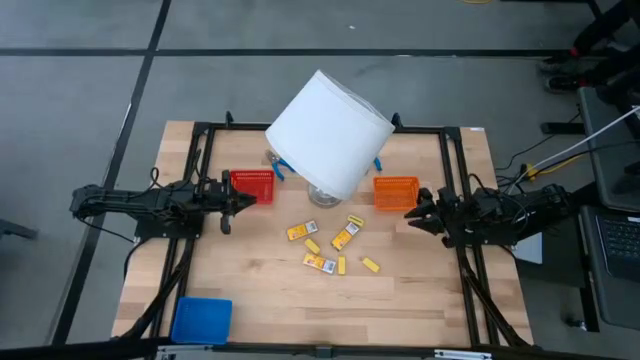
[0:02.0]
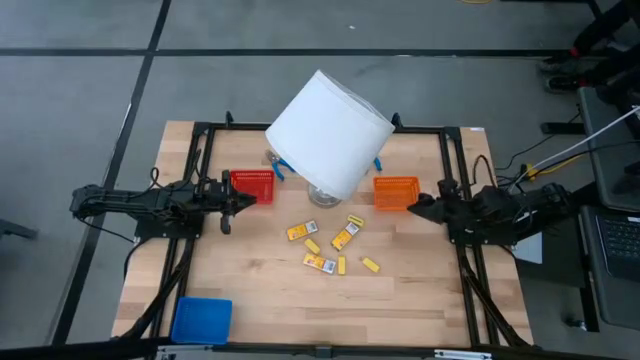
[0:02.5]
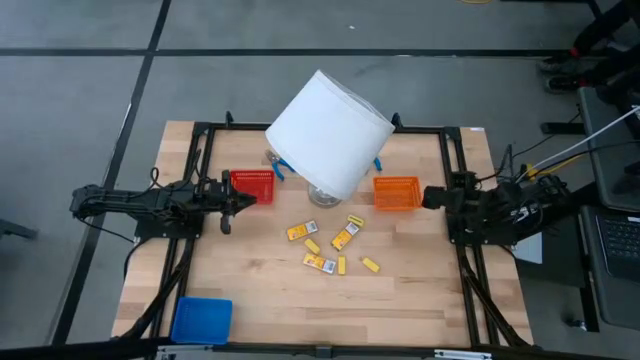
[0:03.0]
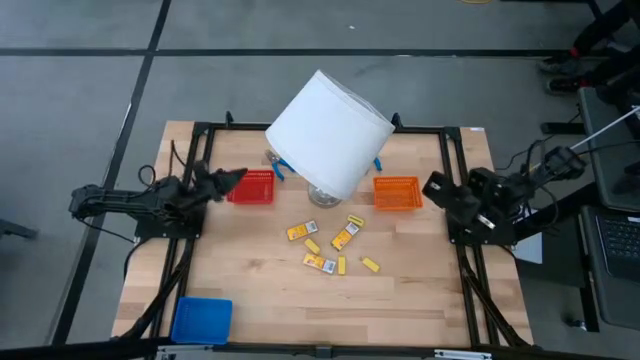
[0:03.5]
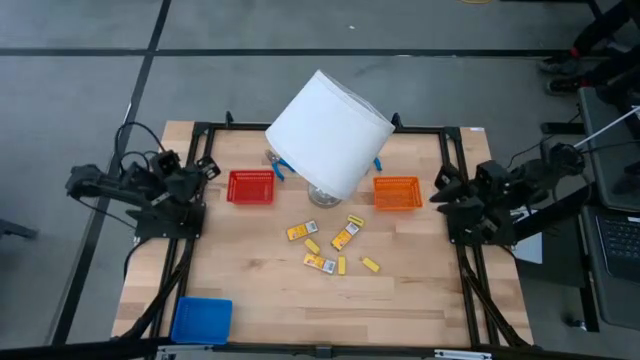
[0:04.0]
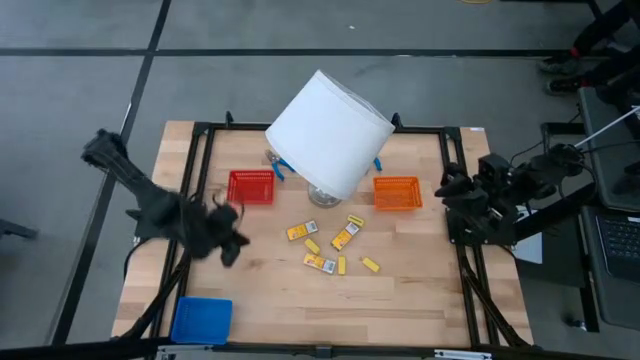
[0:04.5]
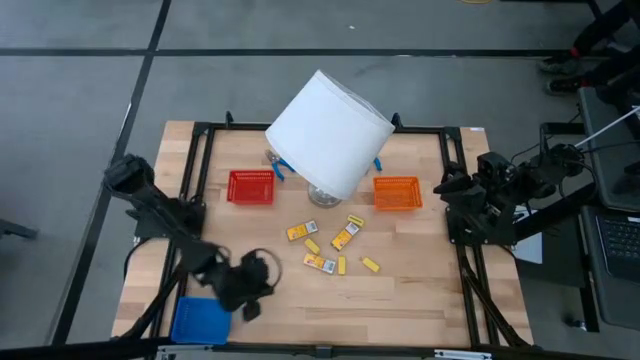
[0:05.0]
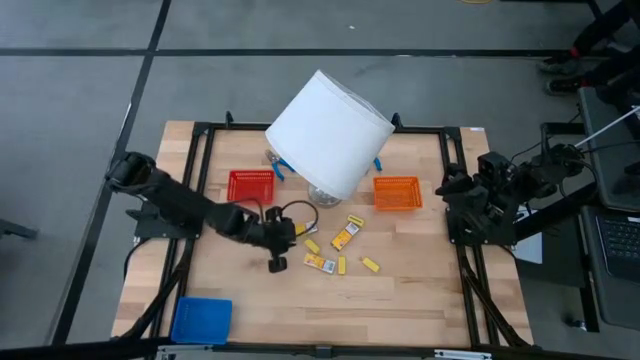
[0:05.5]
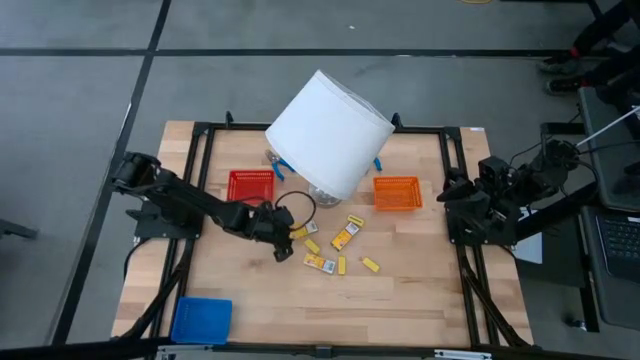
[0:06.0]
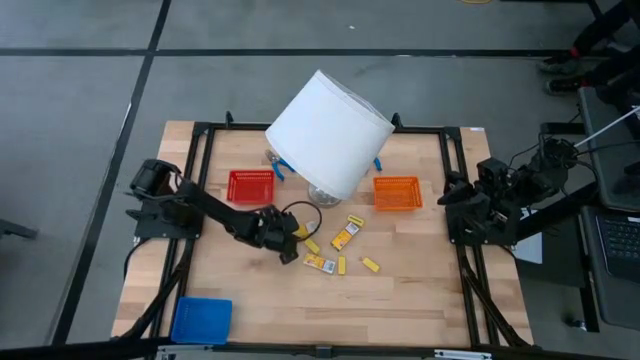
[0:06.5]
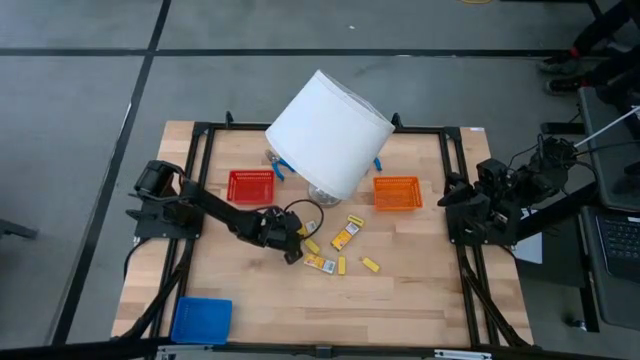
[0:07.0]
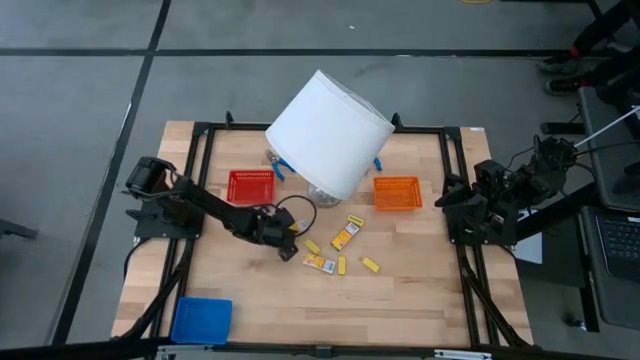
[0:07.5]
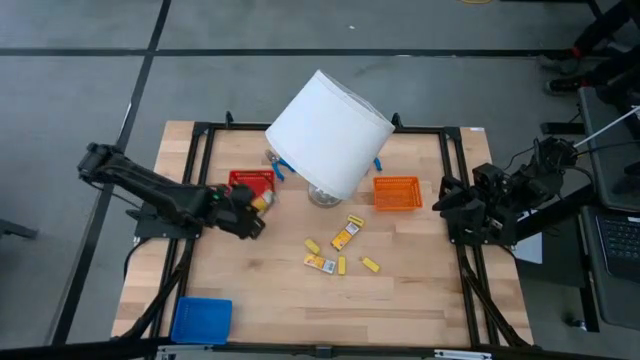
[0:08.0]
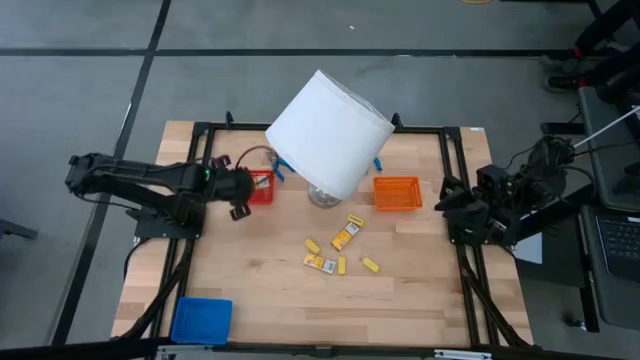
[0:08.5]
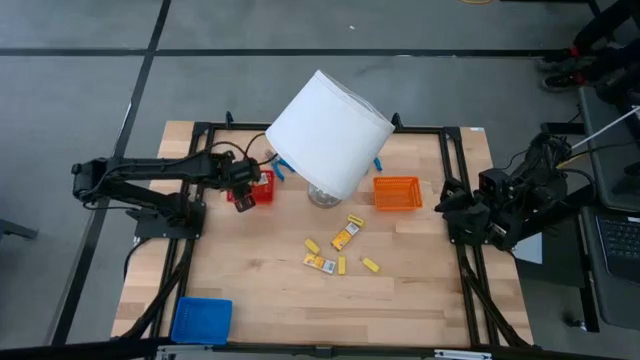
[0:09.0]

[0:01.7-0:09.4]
Task: Pick & Place School Supplies
Put the yellow crayon box into the red bin

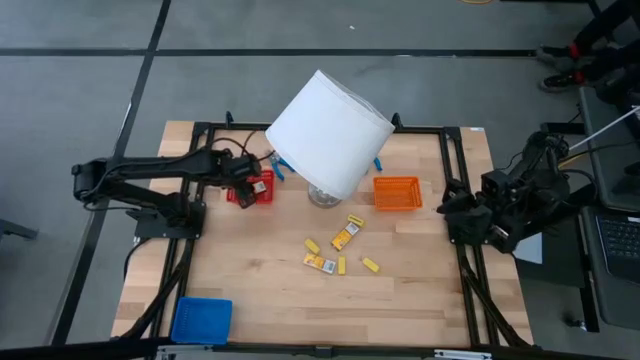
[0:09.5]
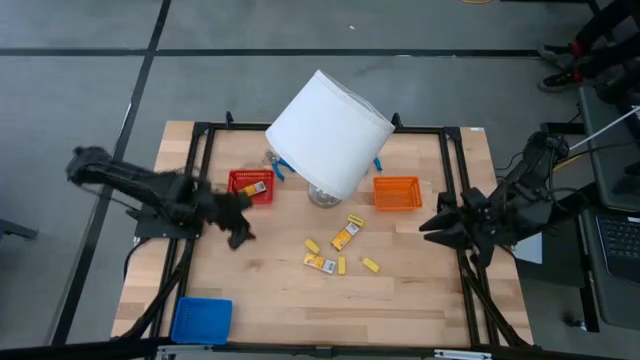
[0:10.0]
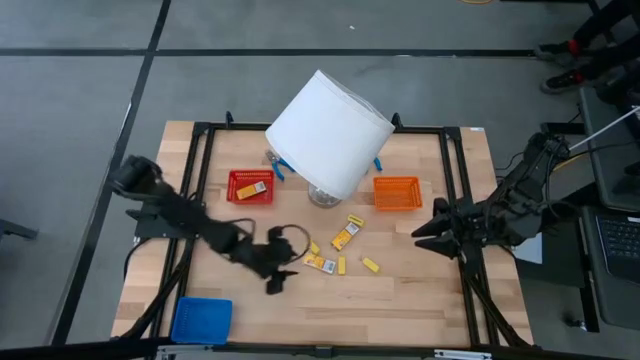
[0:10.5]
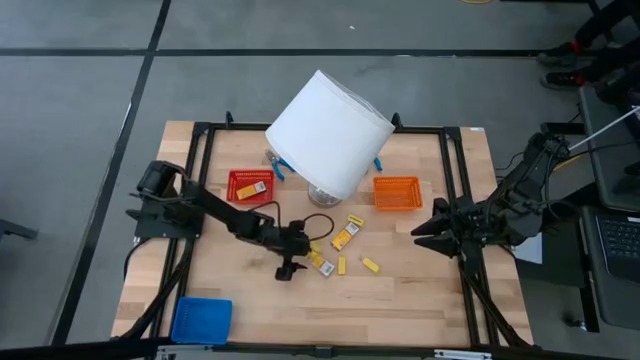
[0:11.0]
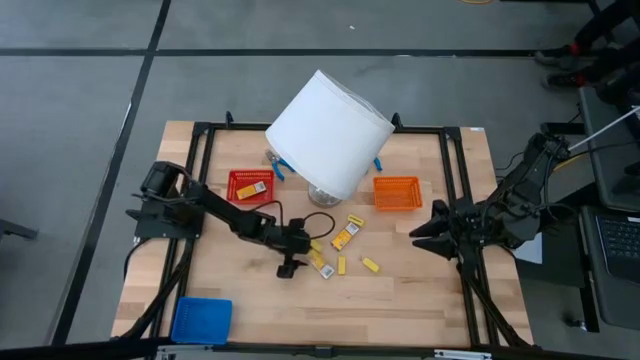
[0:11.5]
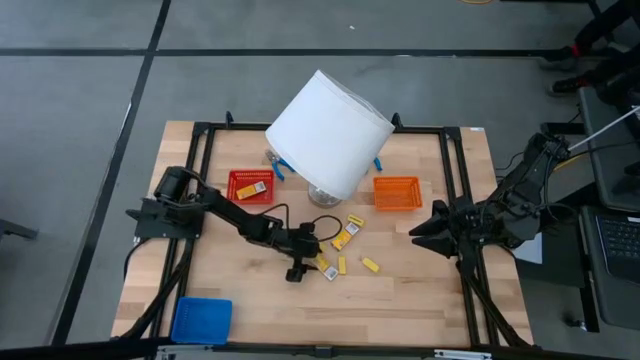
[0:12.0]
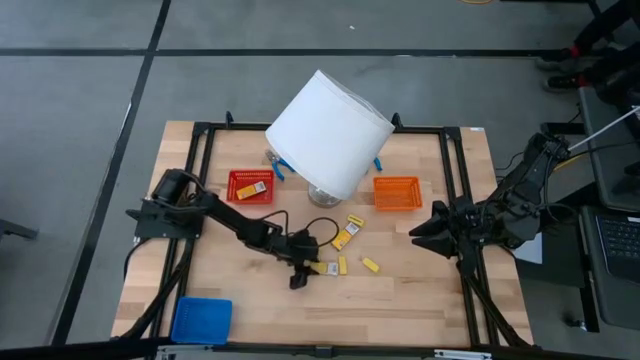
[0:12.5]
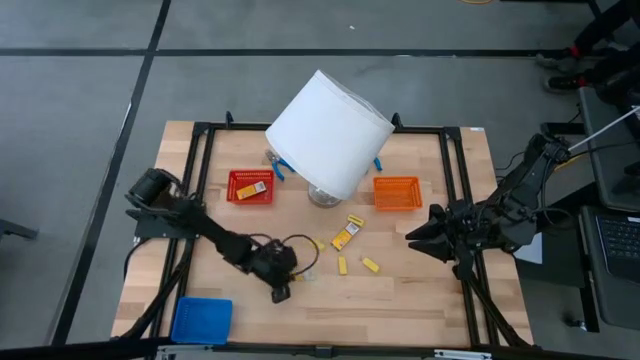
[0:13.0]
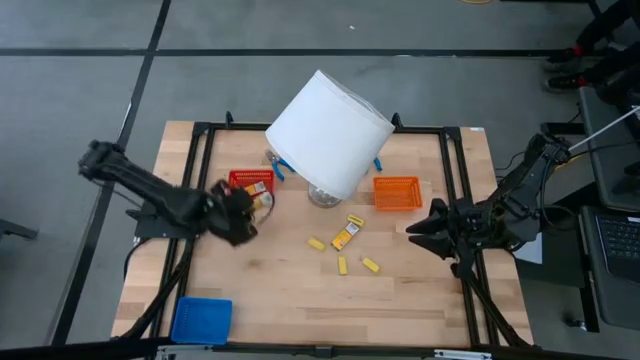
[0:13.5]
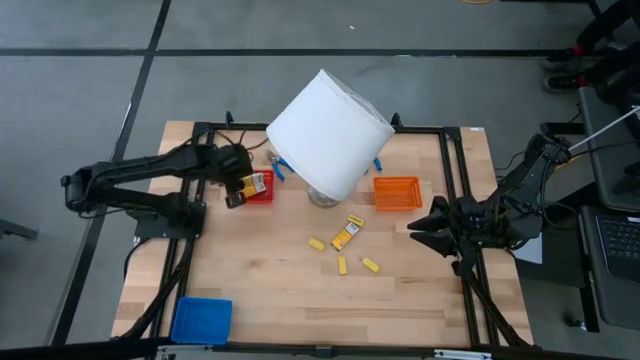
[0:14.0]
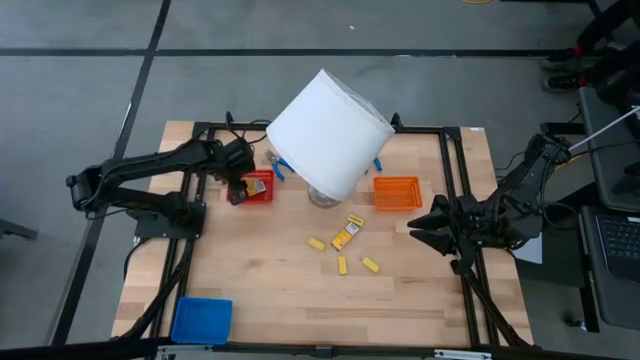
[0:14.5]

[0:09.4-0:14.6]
Put the yellow crayon box into the red bin

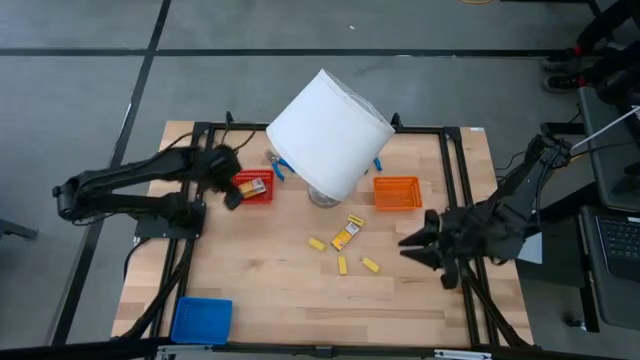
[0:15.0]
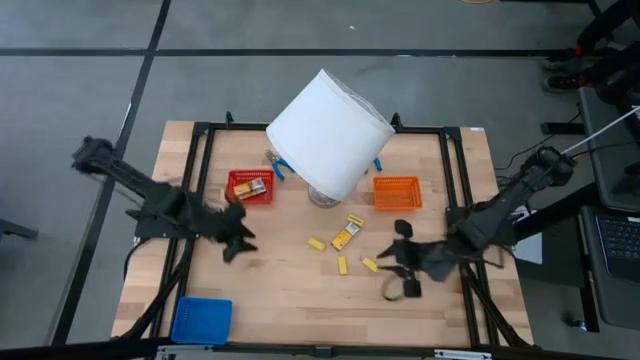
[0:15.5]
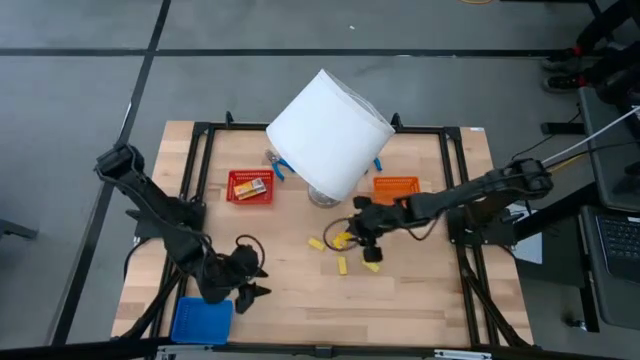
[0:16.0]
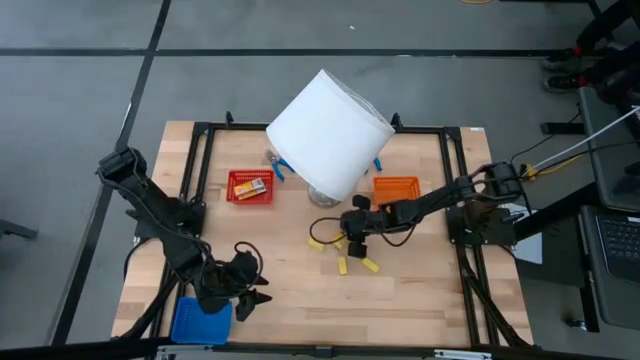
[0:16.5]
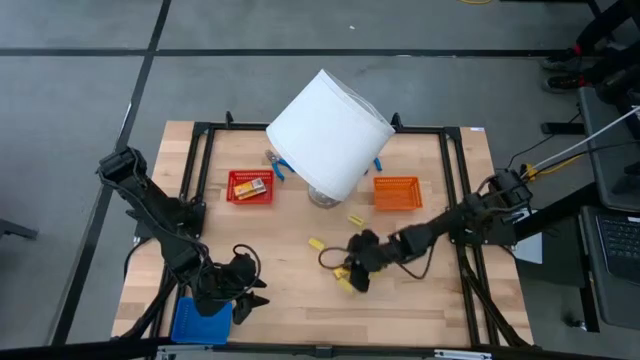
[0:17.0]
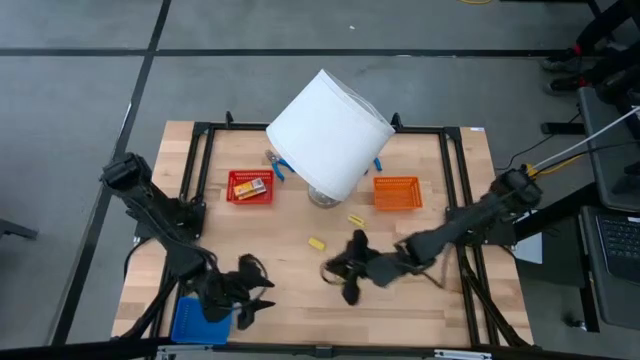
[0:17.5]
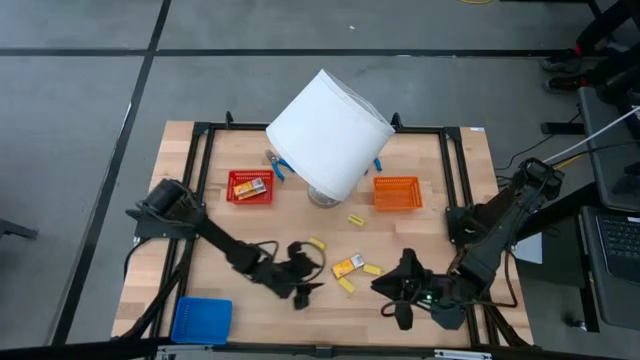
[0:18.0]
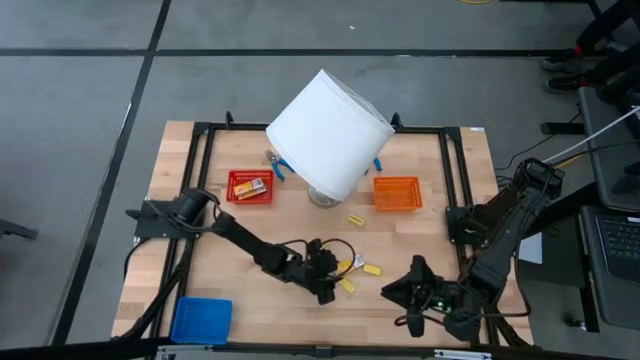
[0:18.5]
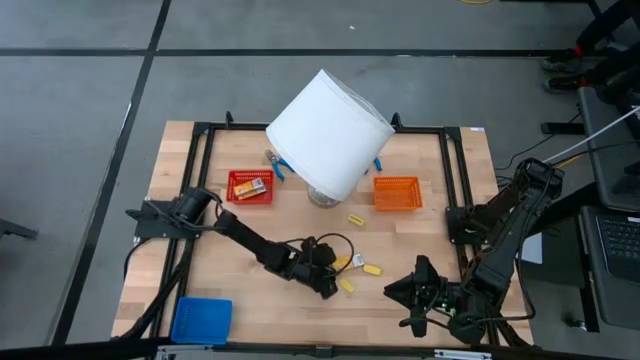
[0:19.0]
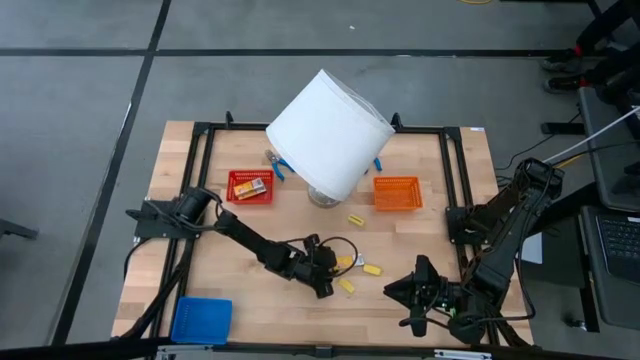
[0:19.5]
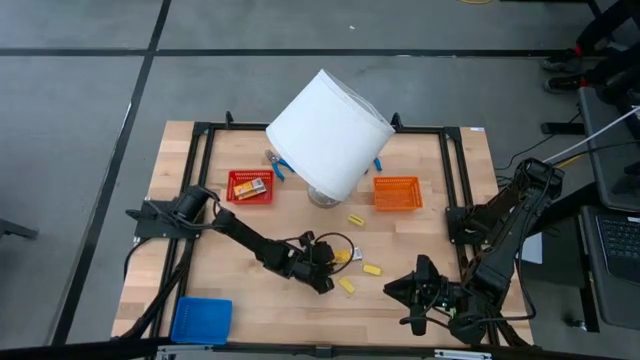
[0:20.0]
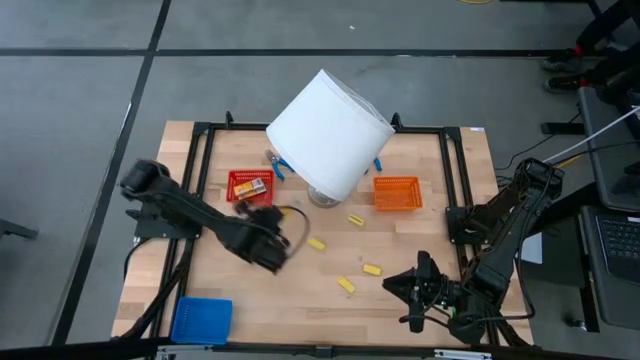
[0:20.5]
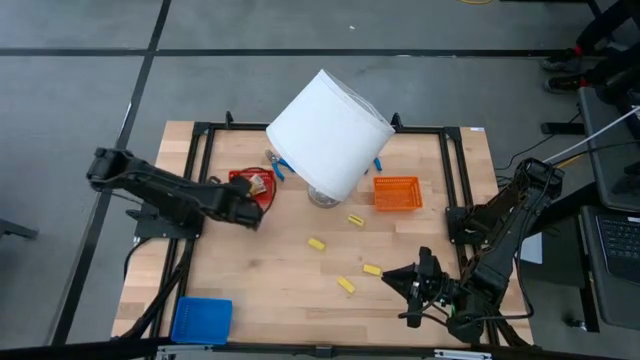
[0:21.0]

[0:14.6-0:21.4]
Put the yellow crayon box into the red bin

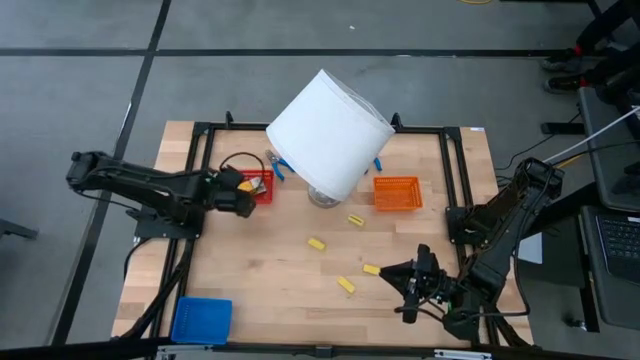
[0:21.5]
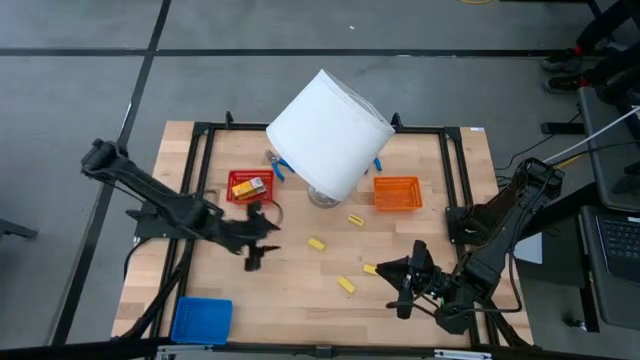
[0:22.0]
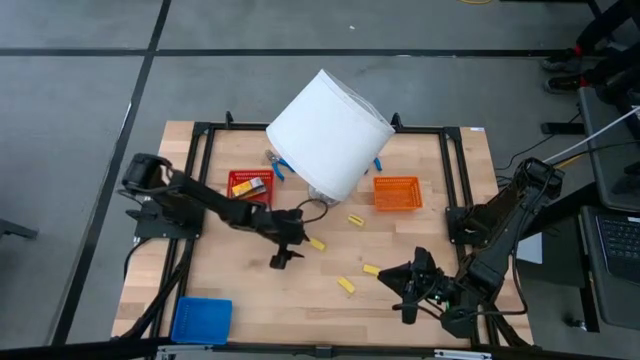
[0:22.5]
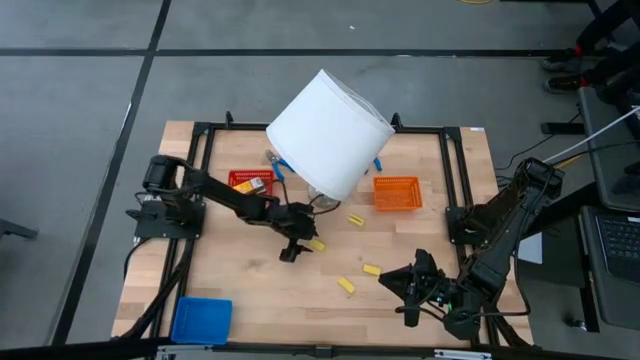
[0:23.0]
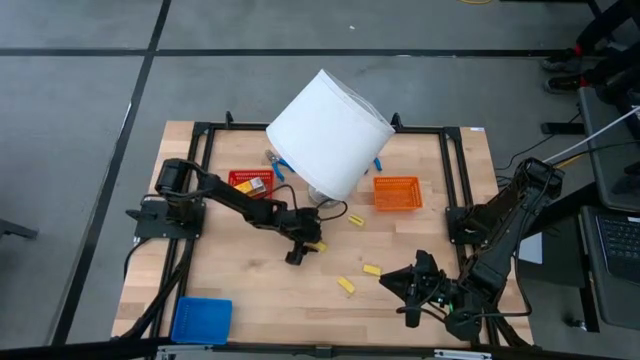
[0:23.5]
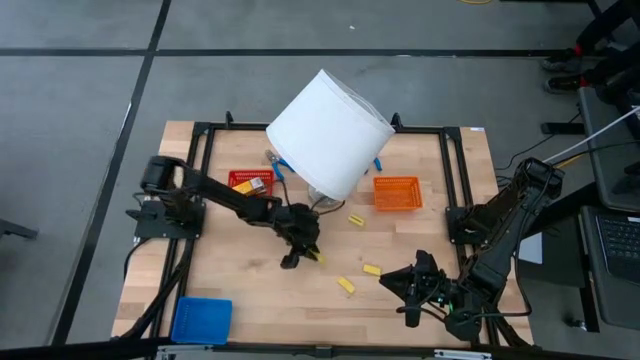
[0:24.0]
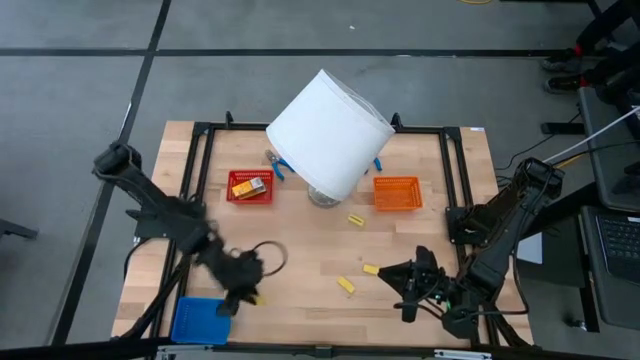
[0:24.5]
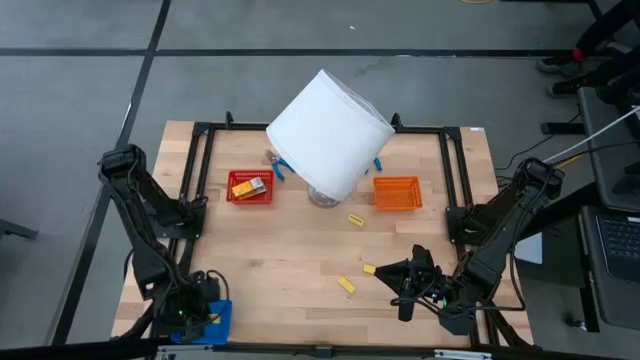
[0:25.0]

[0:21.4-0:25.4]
Put the yellow eraser into the blue bin
